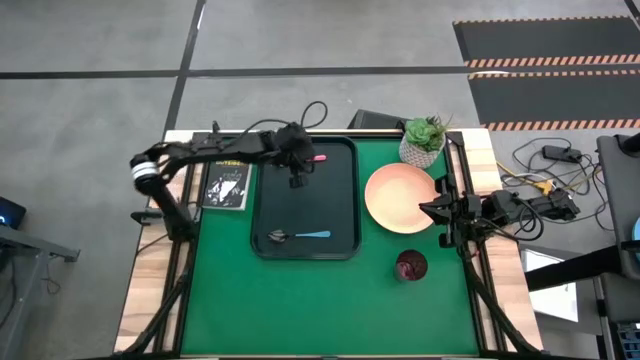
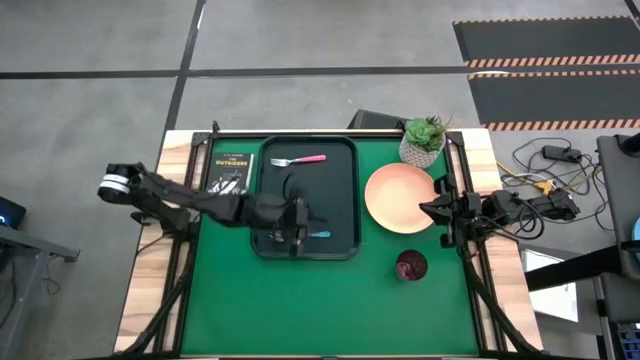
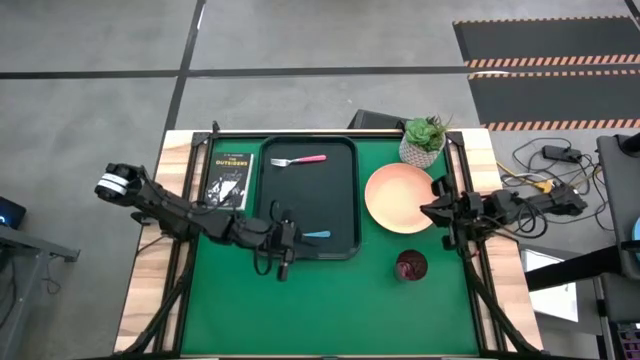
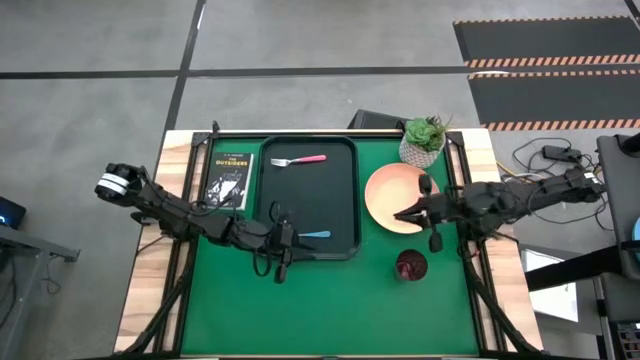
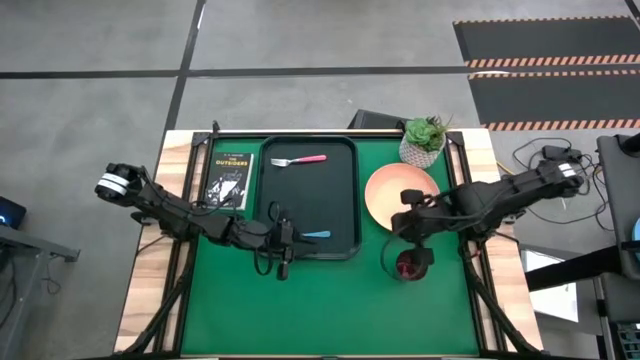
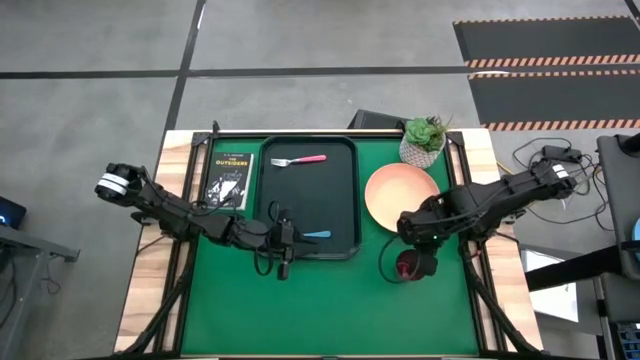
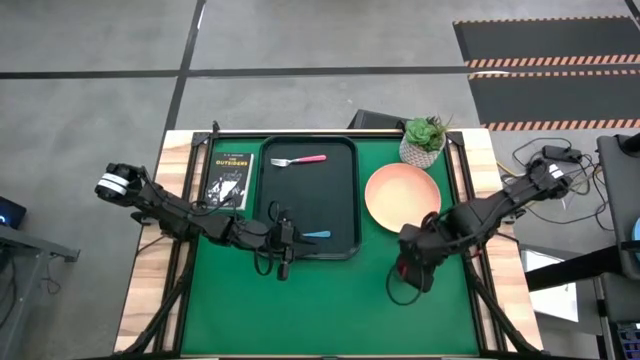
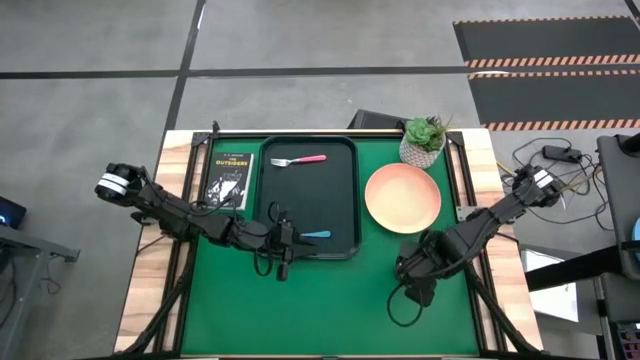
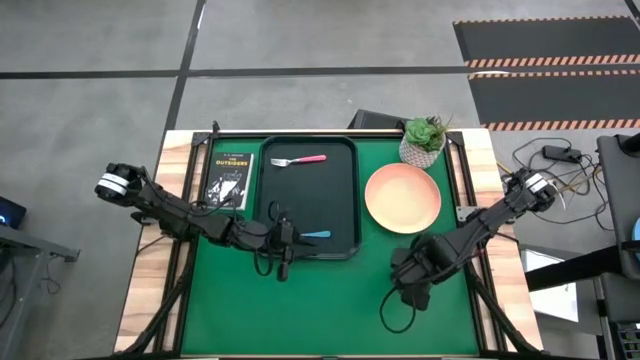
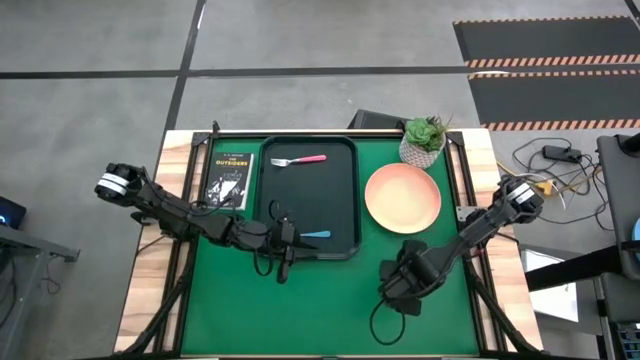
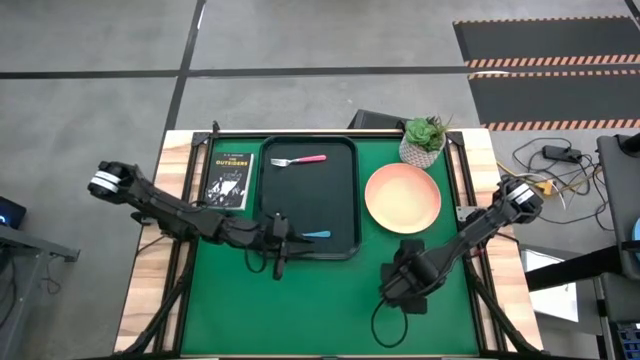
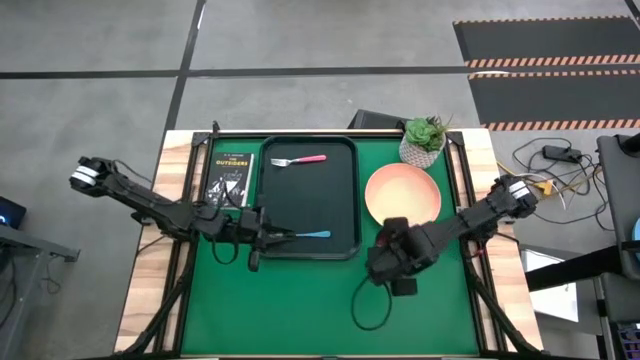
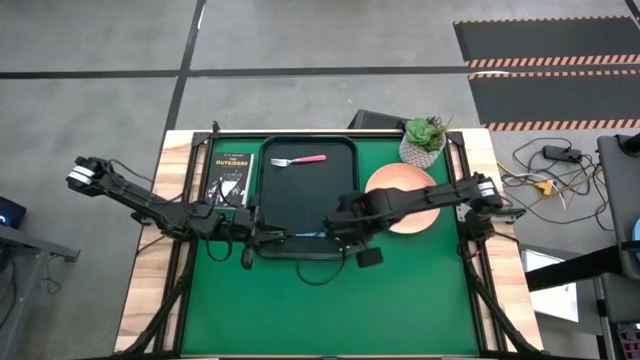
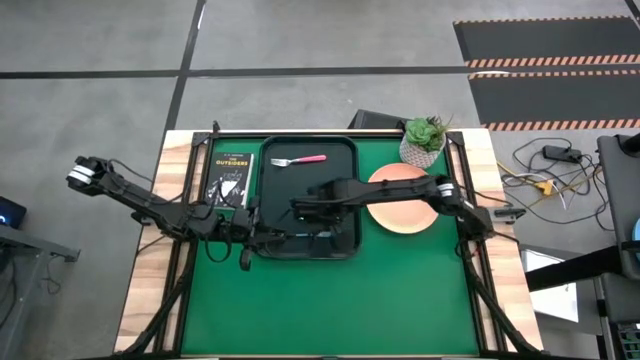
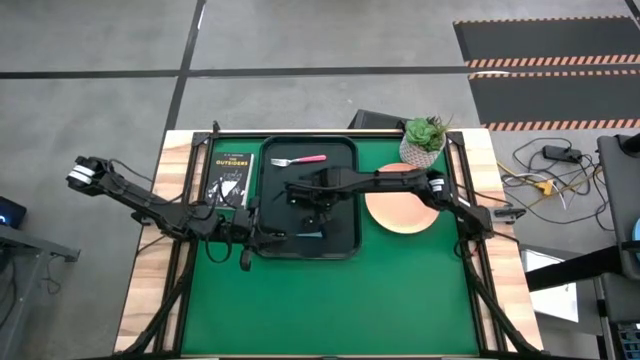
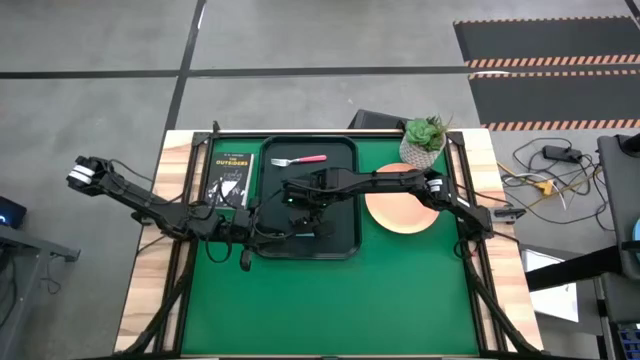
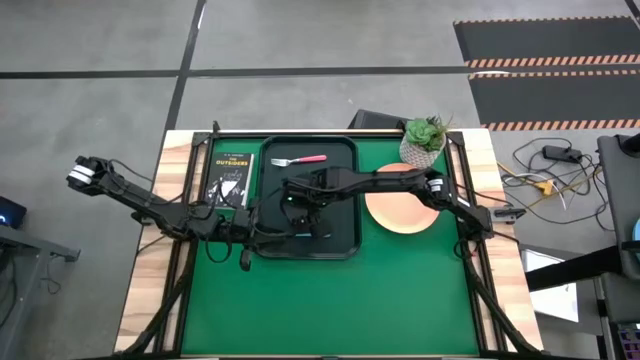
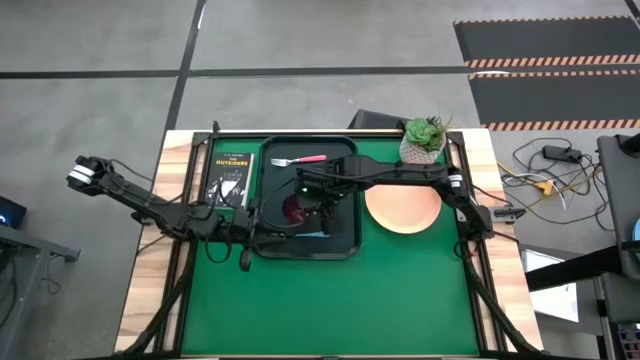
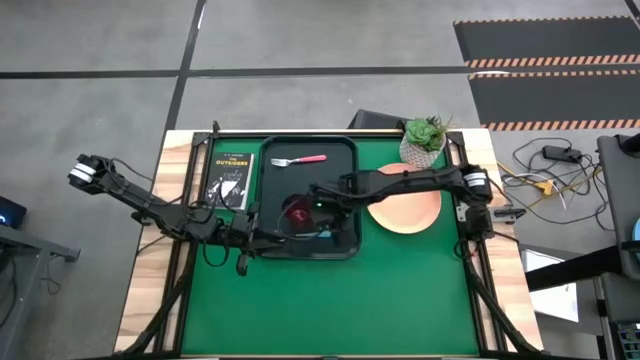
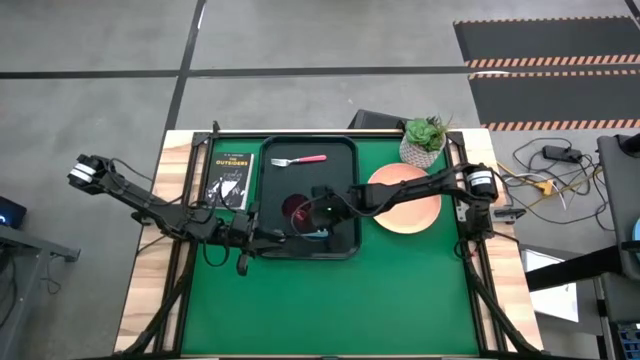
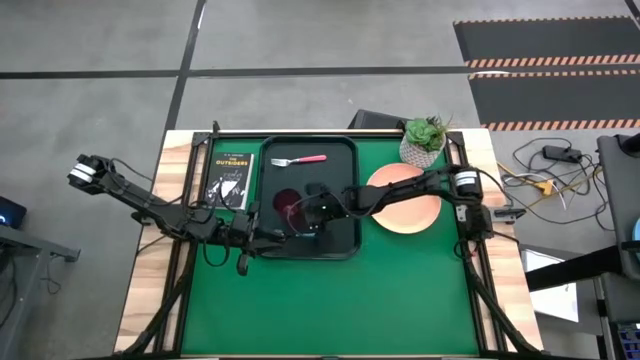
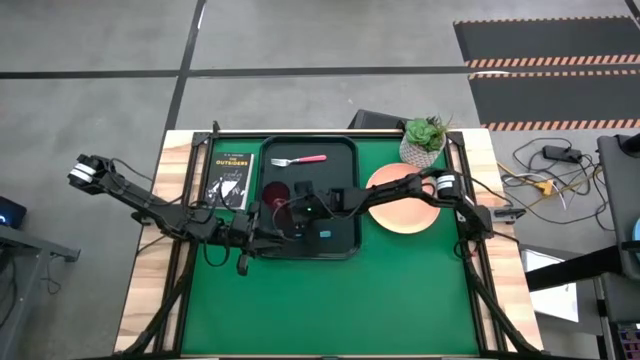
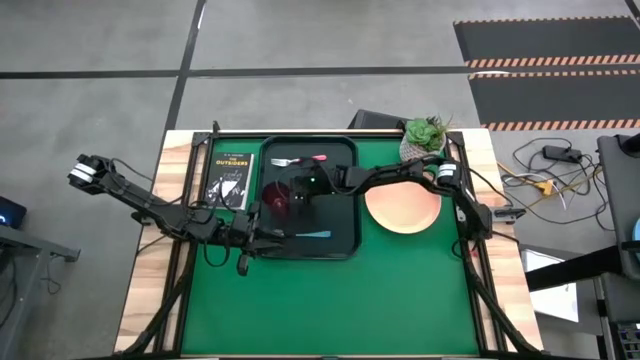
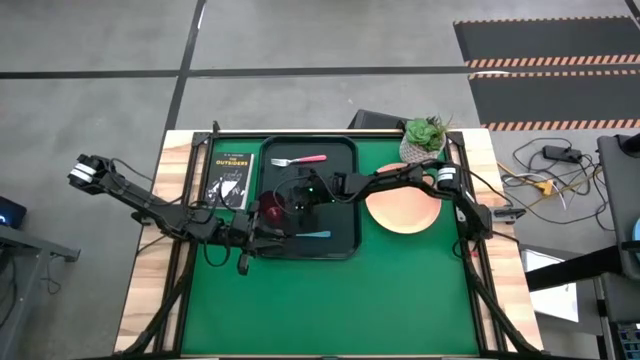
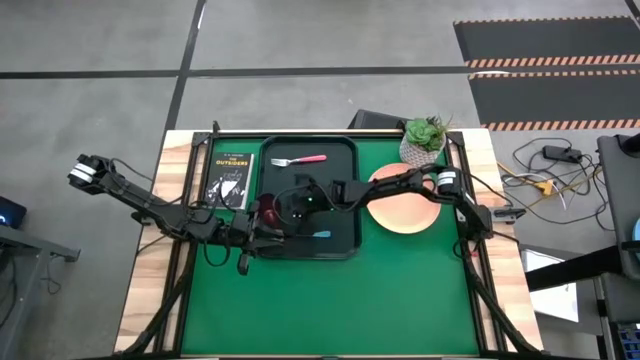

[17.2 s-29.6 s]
Task: Pick and place plate/cup/fork/spoon on tray
Put the red glass on the left of the black serving tray

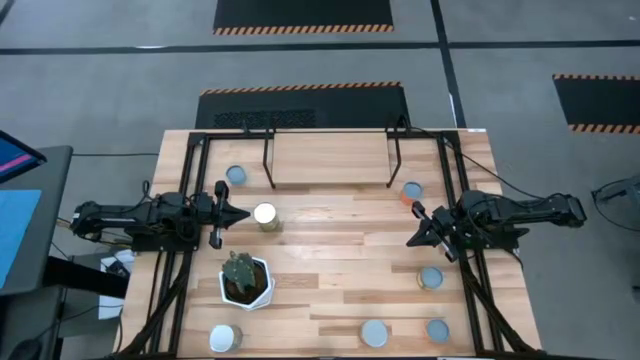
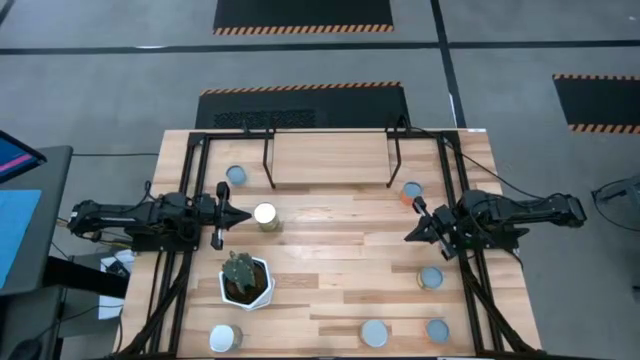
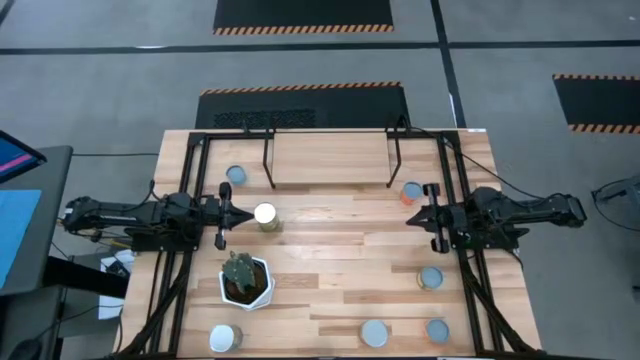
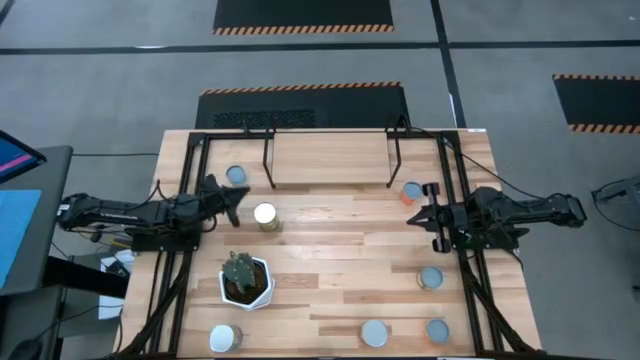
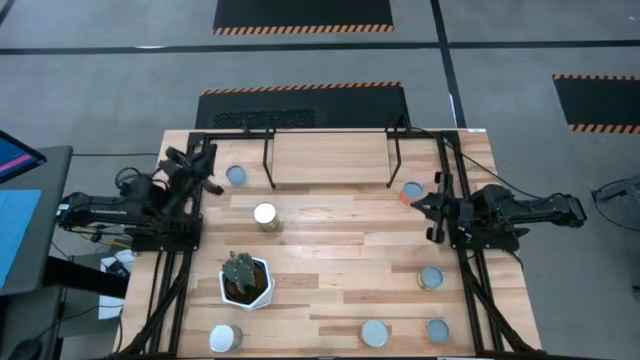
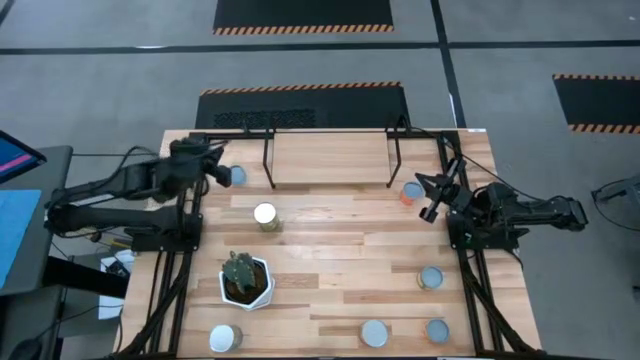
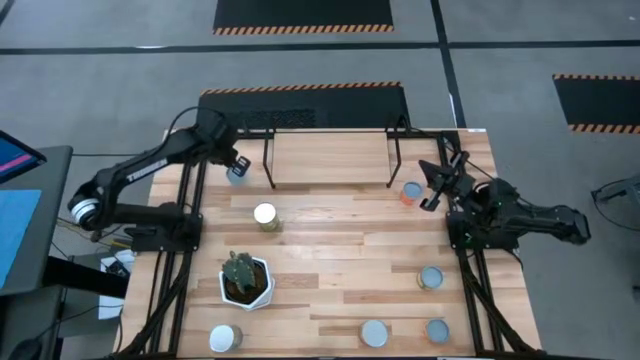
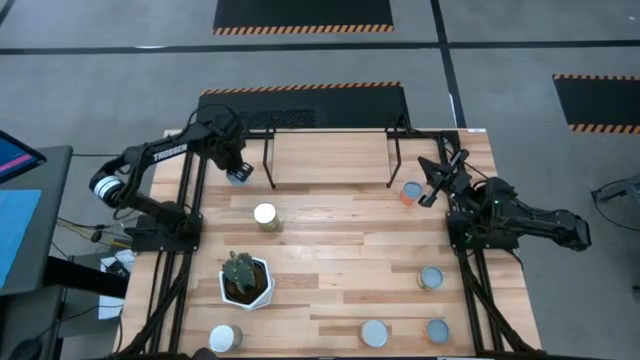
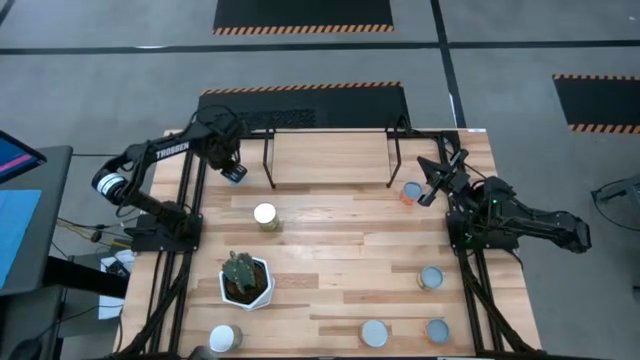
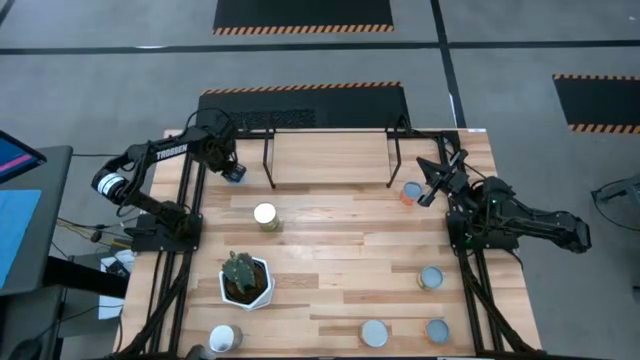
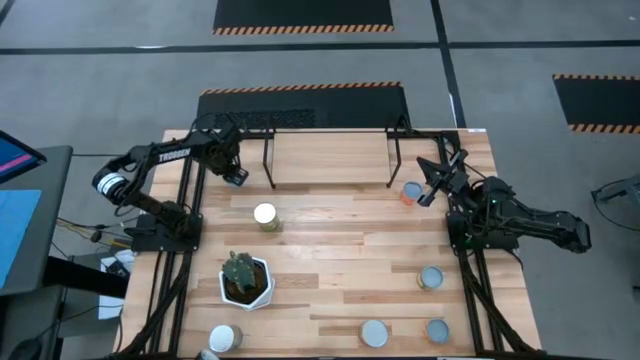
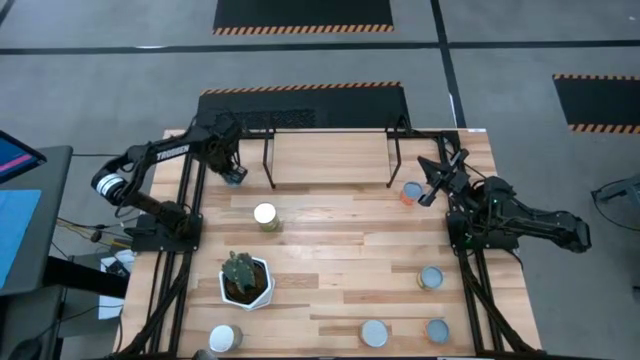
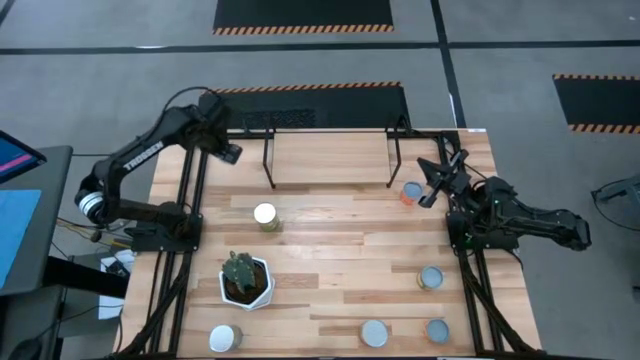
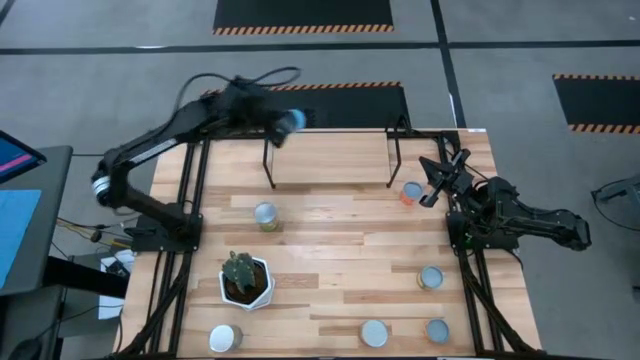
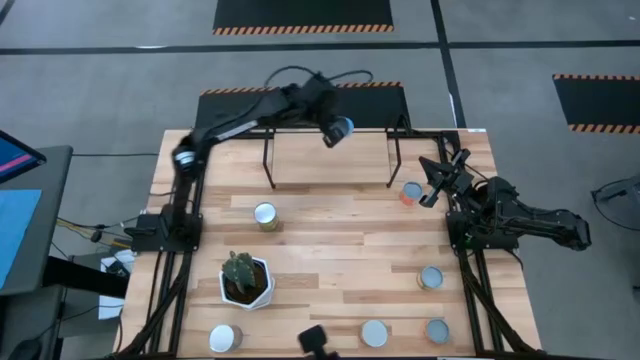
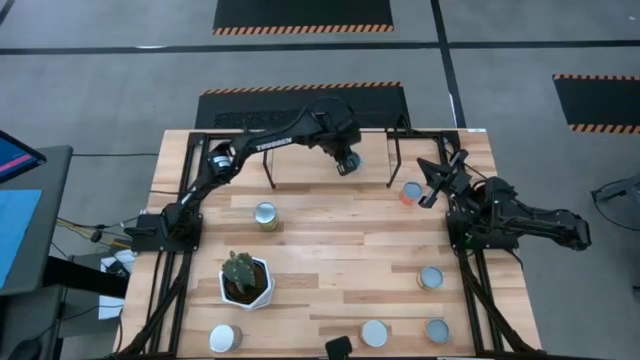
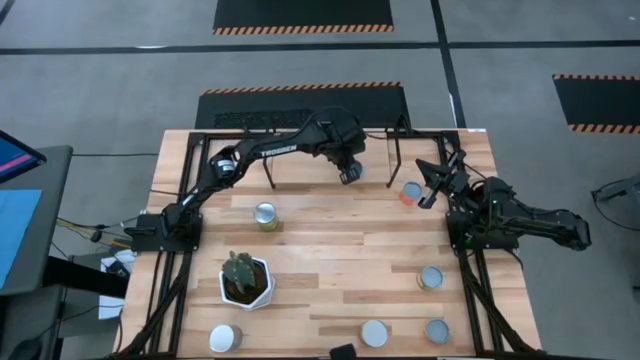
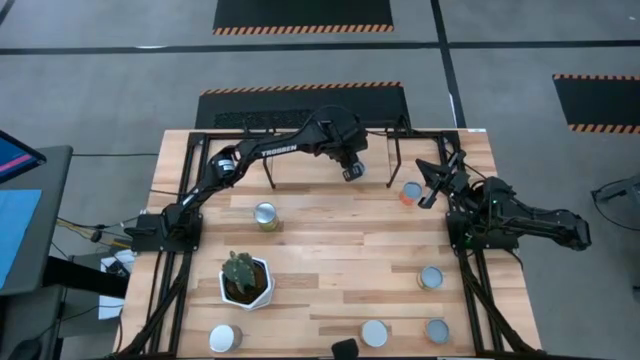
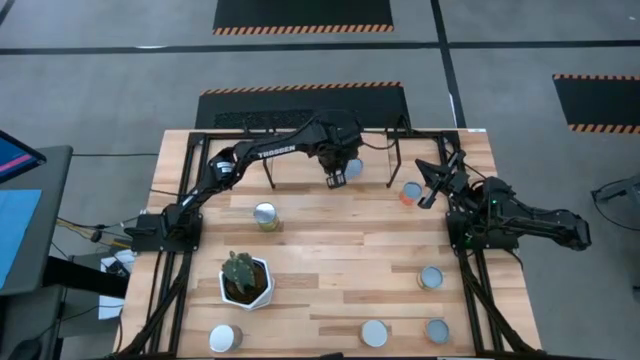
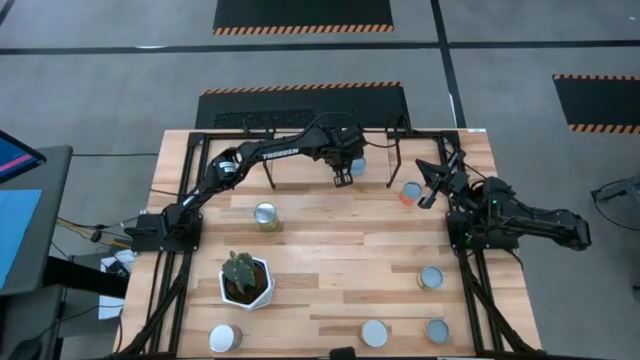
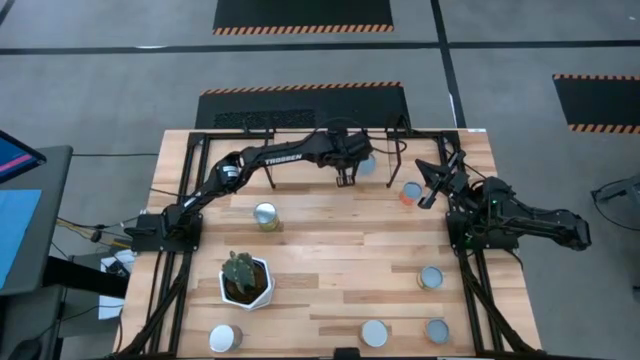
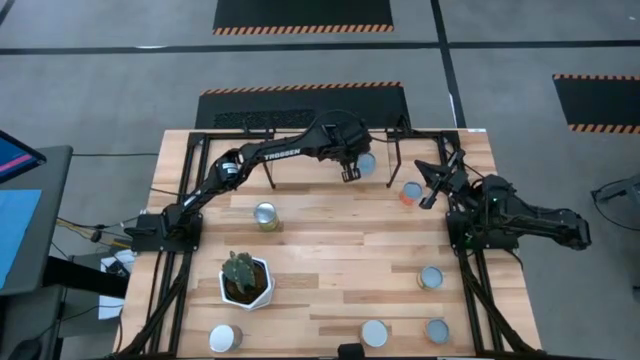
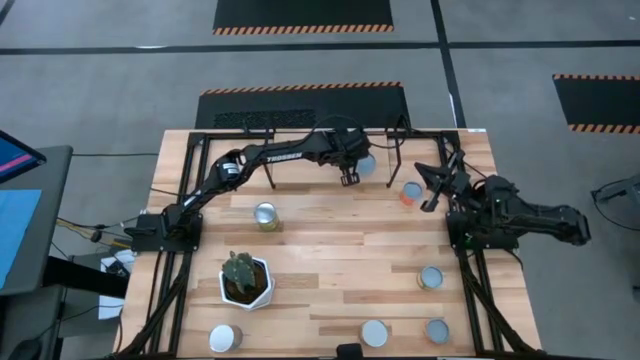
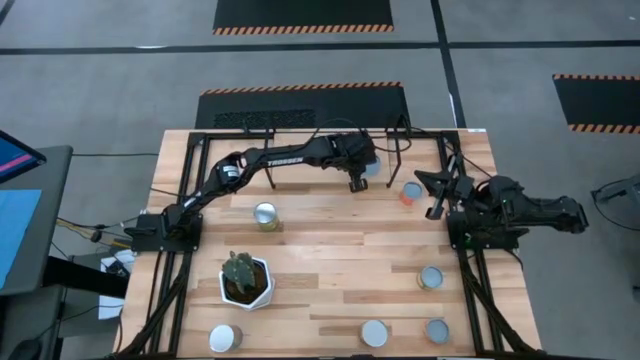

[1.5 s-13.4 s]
Task: Pick and place cans onto a shelf
Put the canned tuna on the shelf
